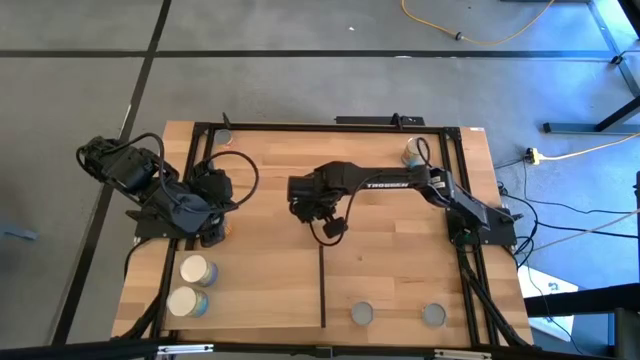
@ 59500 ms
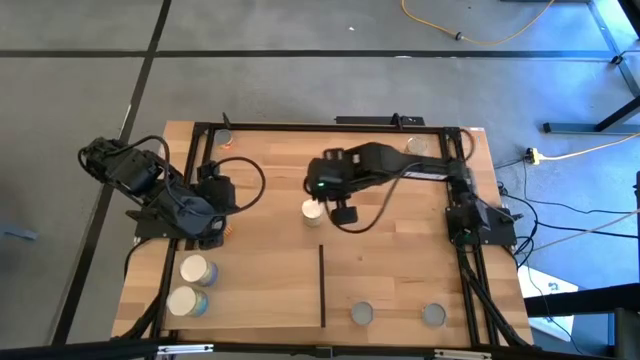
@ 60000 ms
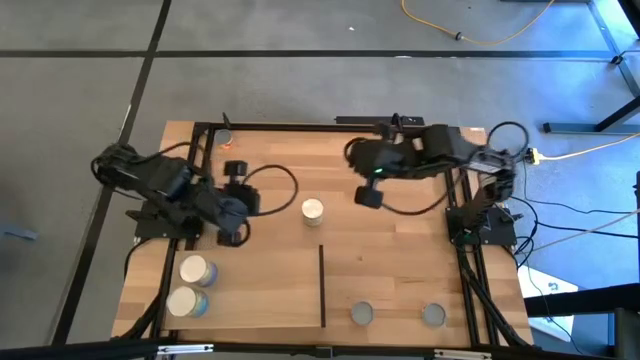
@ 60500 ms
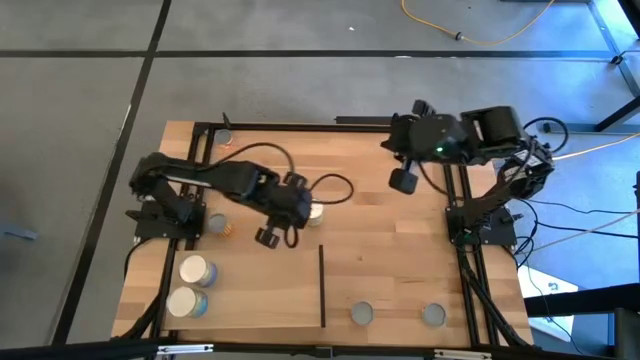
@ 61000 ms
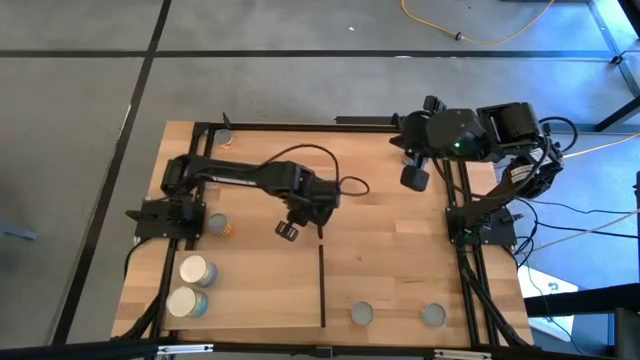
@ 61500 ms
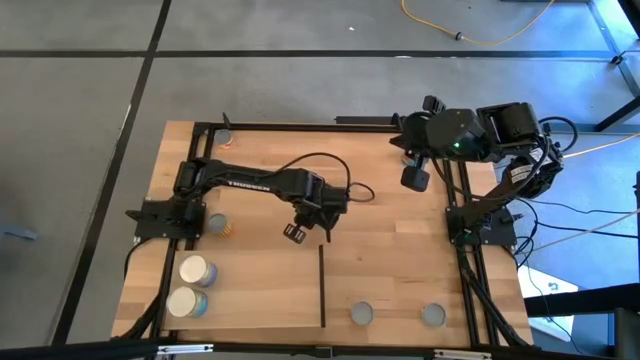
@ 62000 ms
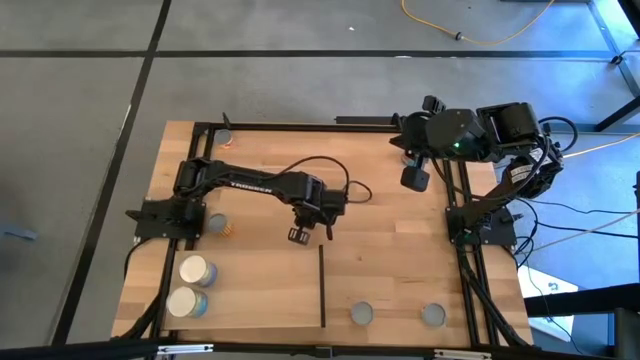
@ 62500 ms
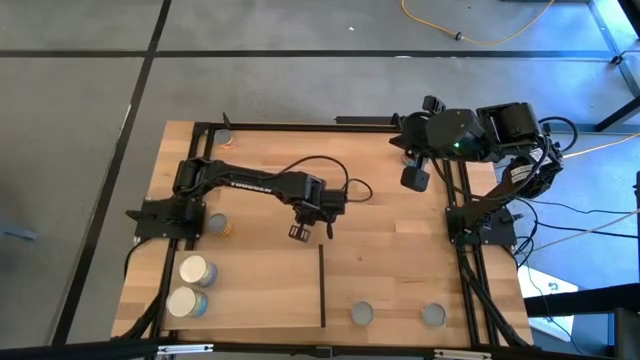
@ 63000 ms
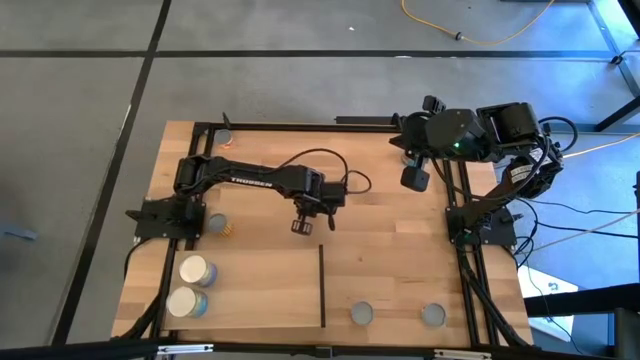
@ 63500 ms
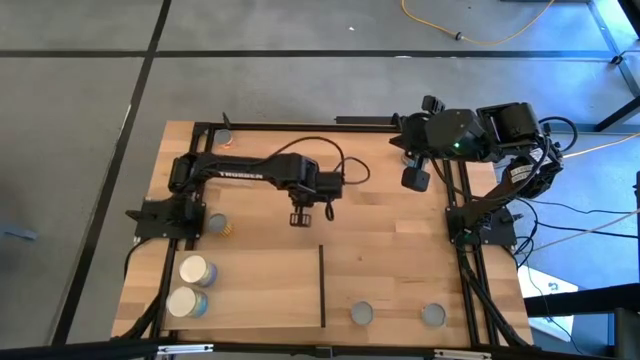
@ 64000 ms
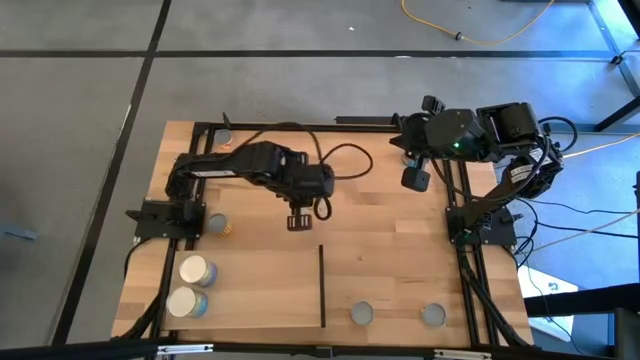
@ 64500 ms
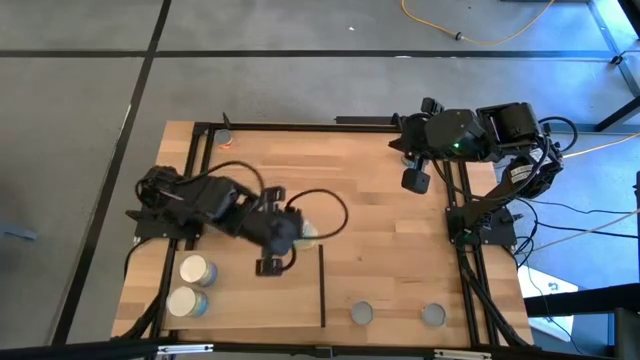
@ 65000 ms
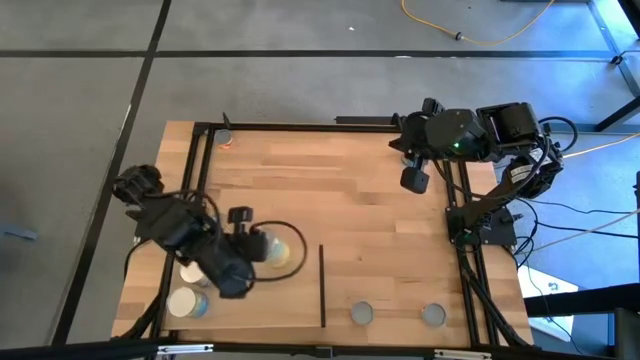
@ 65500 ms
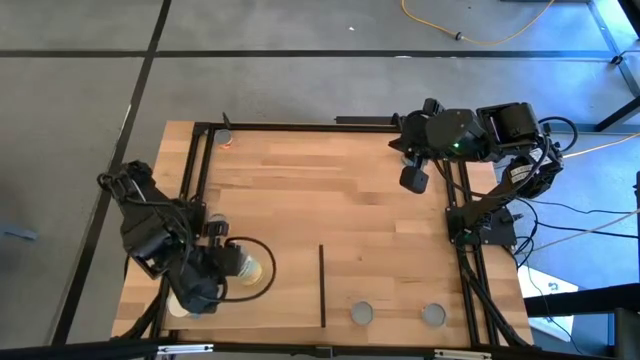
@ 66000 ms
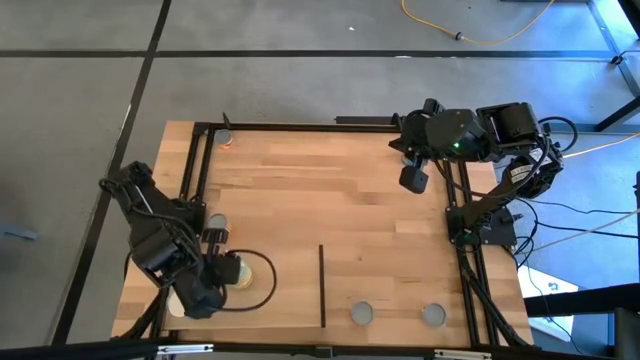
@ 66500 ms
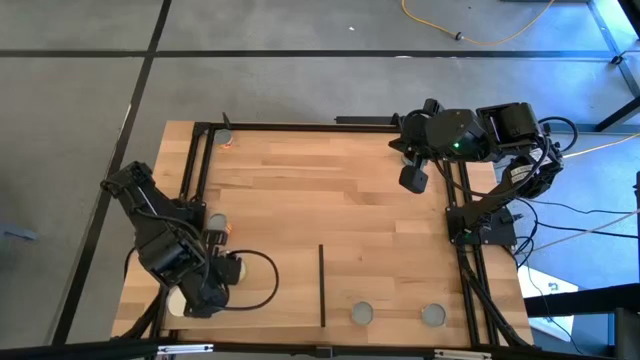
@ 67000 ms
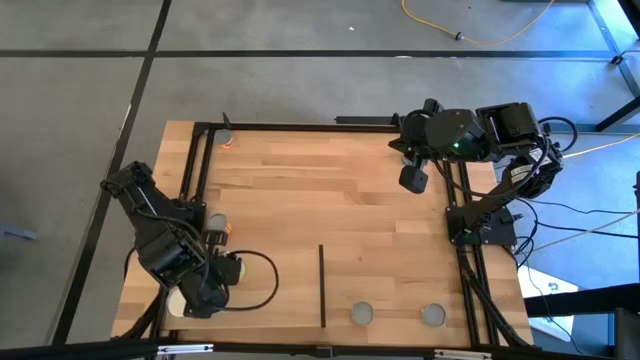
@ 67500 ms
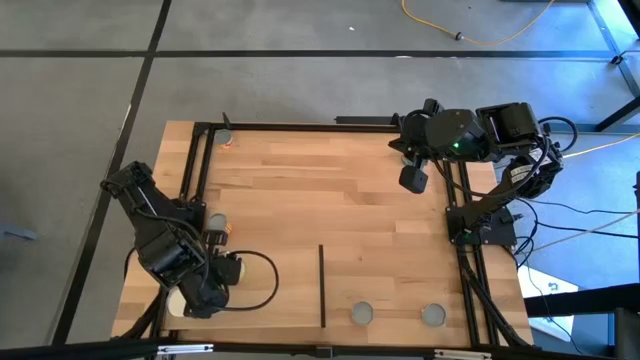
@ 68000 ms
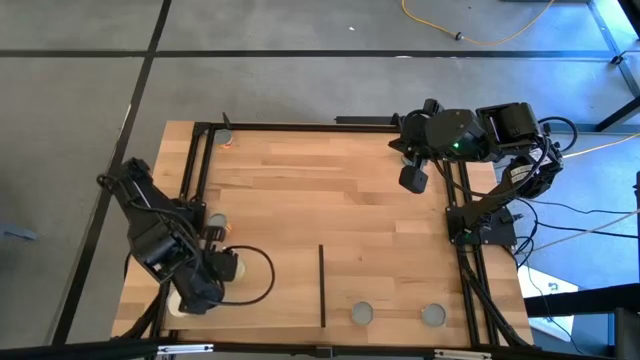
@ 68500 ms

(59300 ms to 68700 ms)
Task: Pick and place cans onto a shelf
Put the canned carrots on the shelf

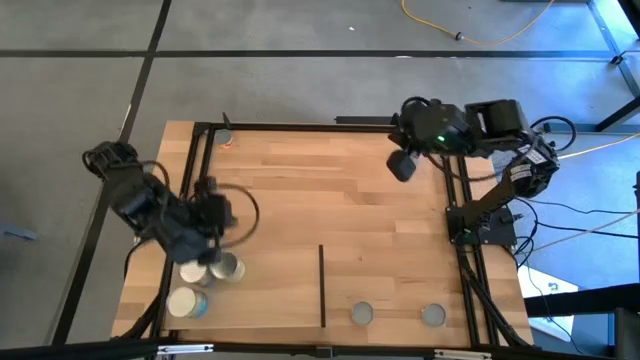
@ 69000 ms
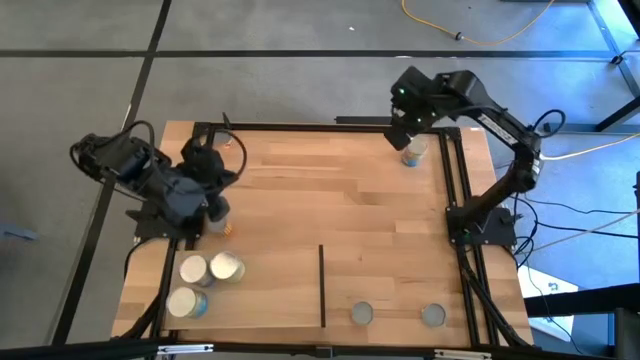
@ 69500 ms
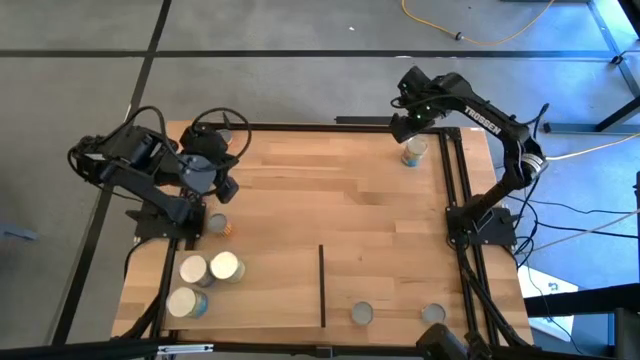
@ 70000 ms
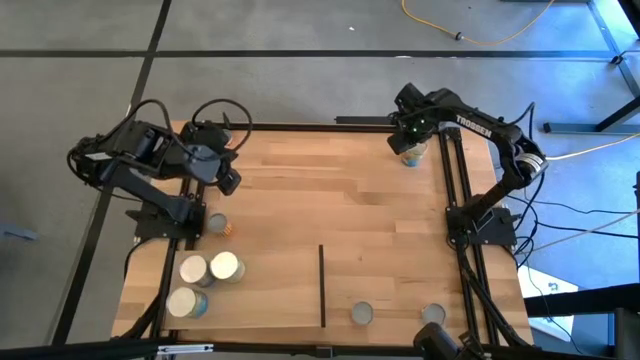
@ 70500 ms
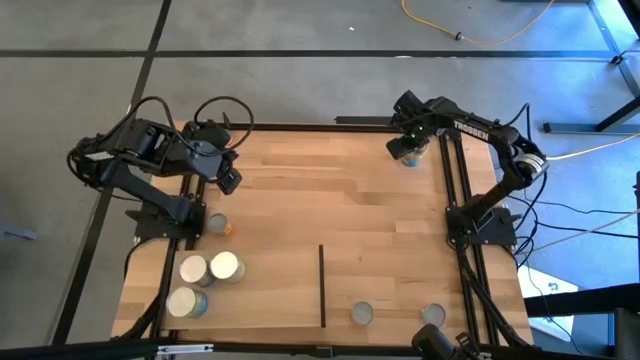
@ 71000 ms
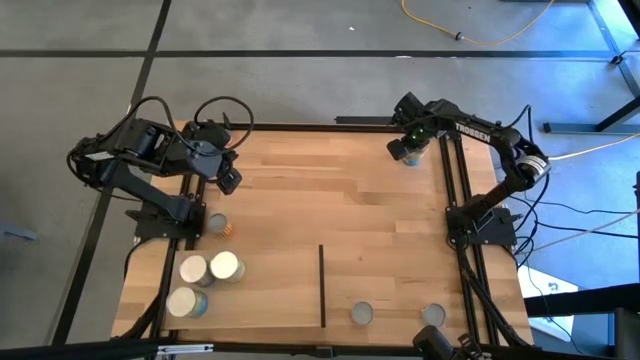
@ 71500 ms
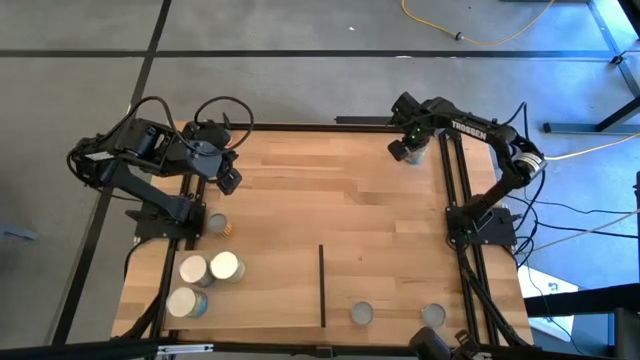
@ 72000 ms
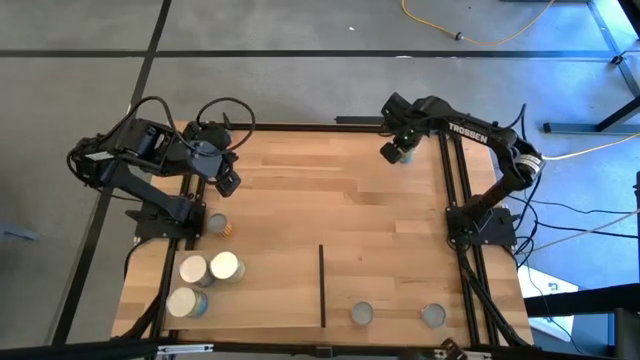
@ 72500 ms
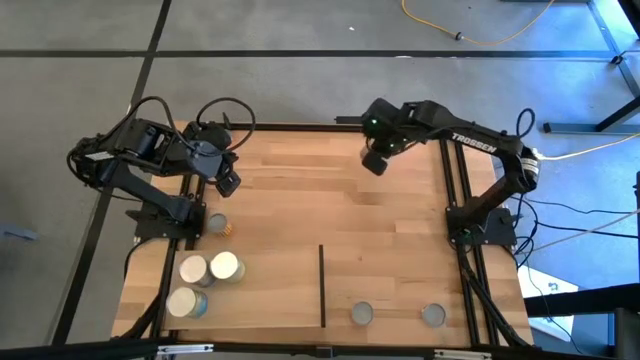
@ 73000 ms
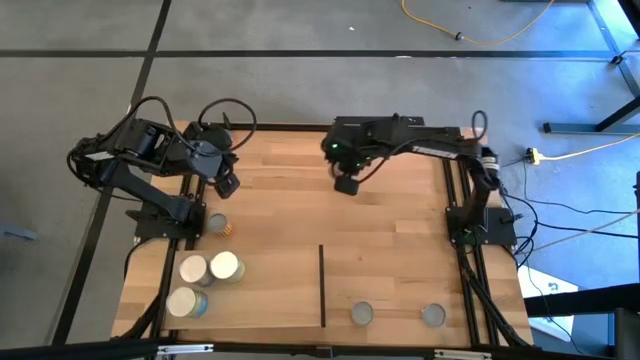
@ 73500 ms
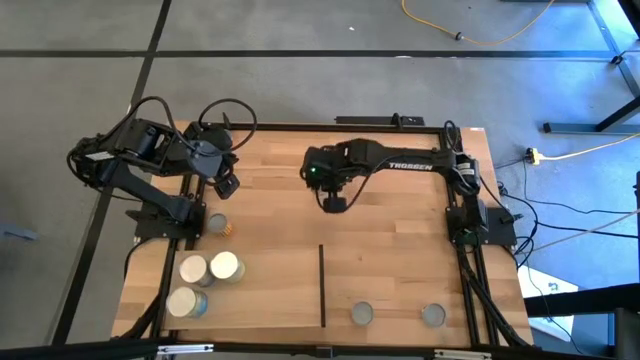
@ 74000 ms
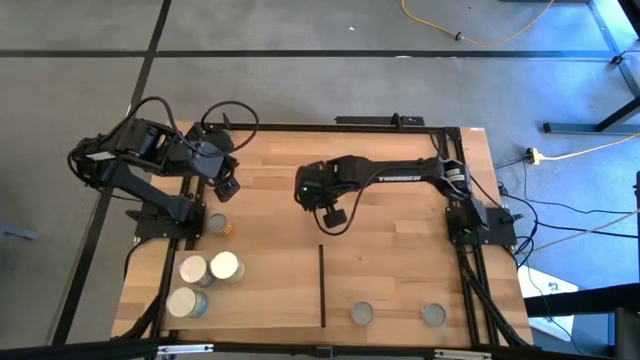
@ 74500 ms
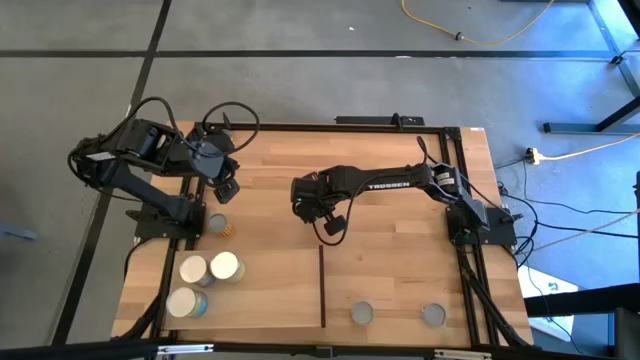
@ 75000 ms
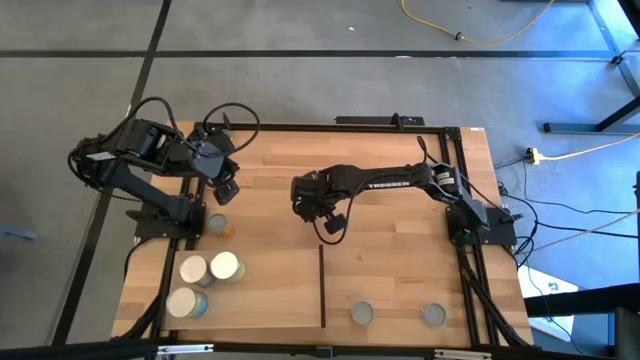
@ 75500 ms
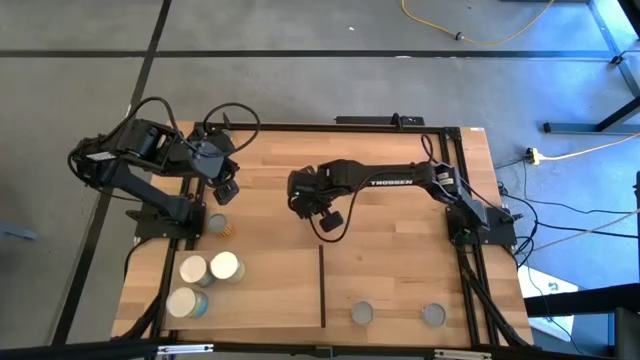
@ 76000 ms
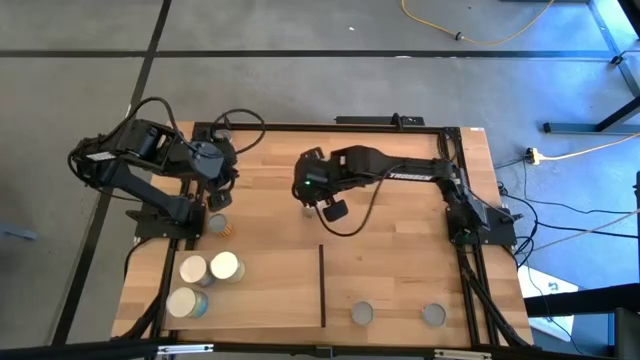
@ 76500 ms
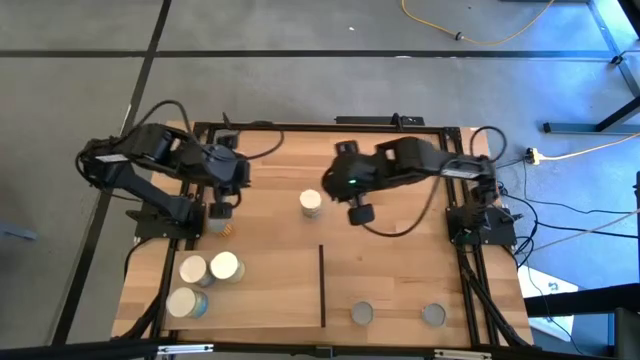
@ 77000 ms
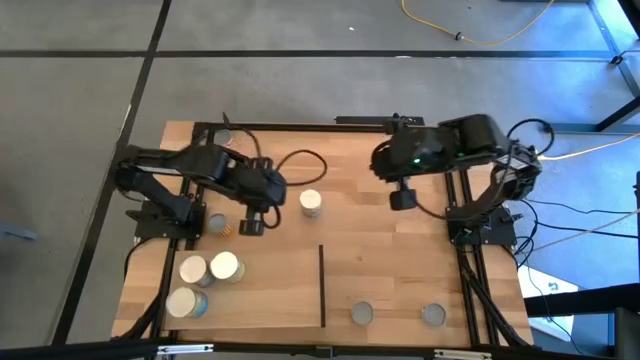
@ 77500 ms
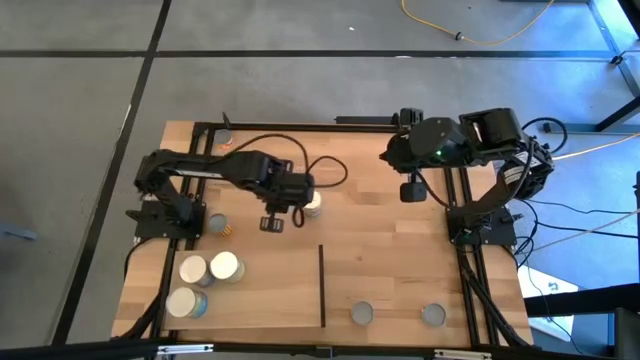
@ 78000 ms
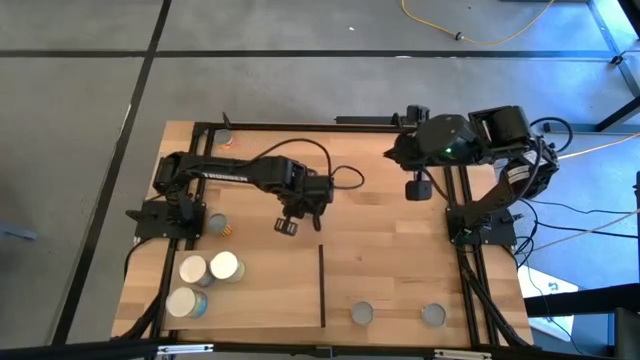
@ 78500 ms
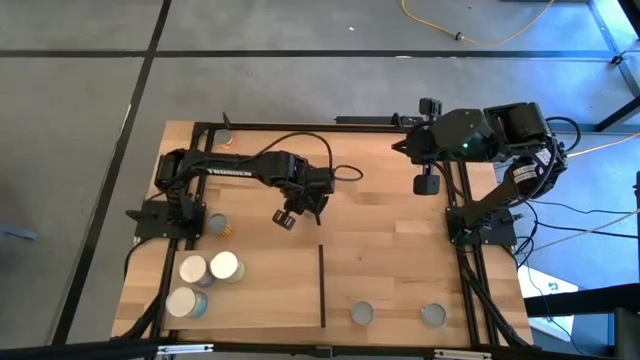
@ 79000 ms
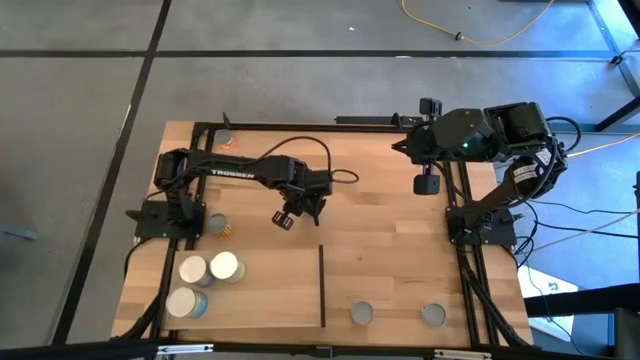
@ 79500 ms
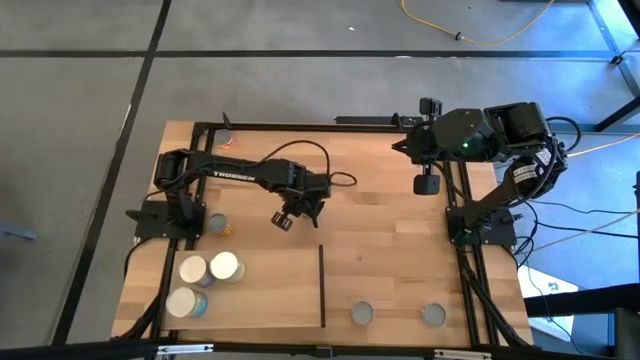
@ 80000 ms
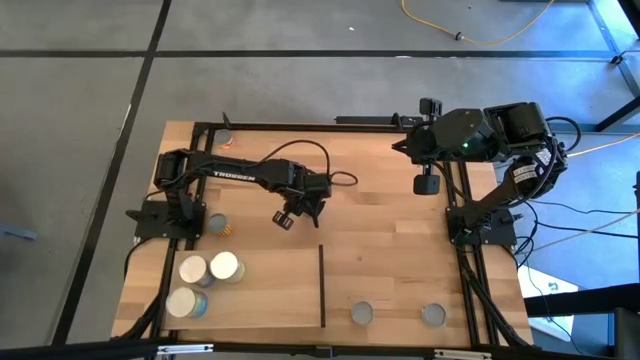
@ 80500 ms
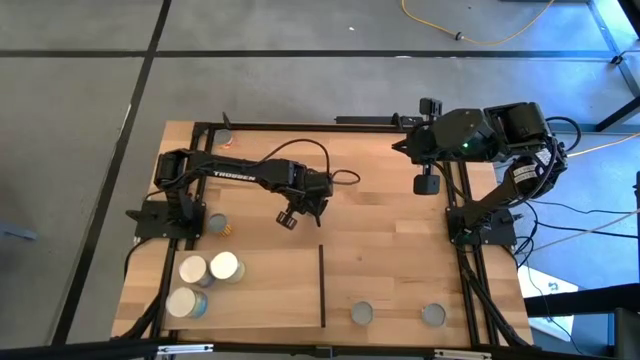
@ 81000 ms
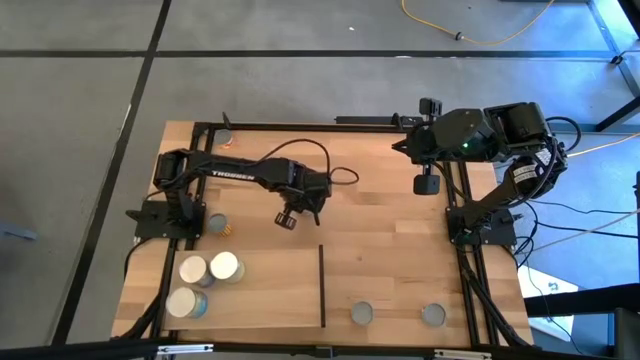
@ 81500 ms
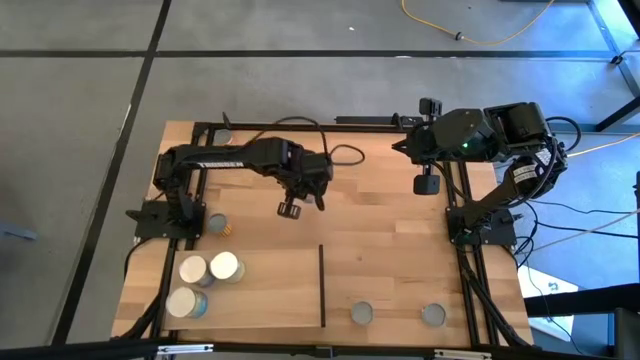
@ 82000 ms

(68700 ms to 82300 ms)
Put the canned tomato on the shelf
